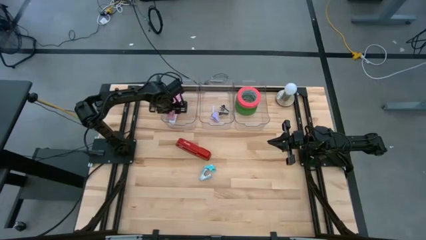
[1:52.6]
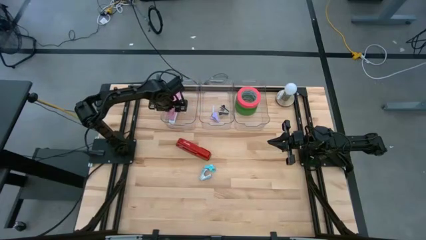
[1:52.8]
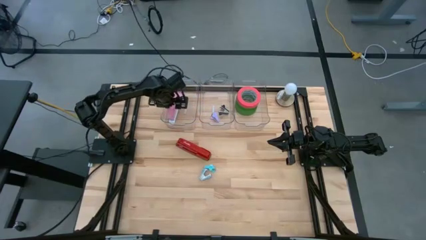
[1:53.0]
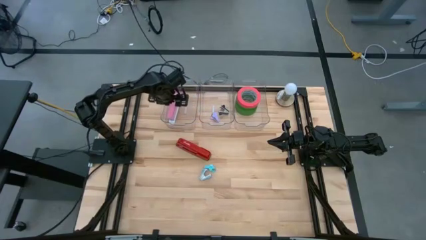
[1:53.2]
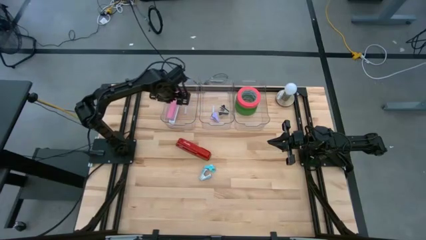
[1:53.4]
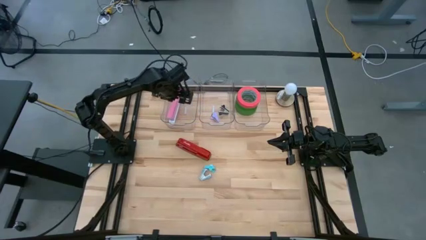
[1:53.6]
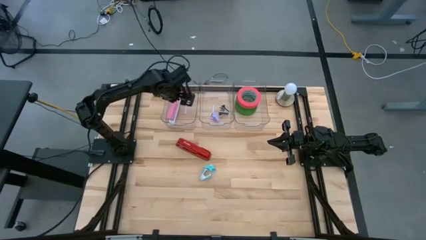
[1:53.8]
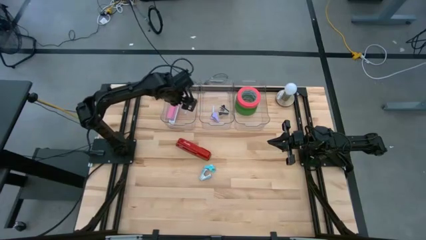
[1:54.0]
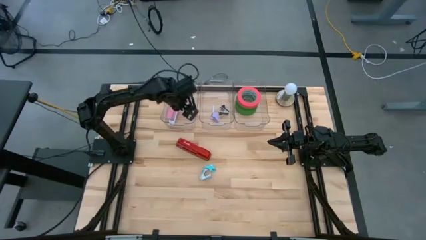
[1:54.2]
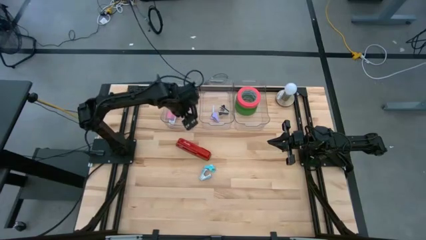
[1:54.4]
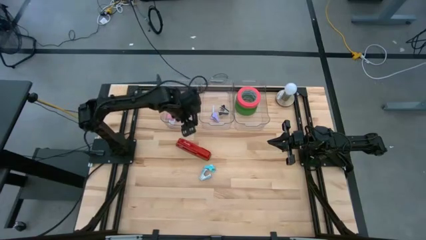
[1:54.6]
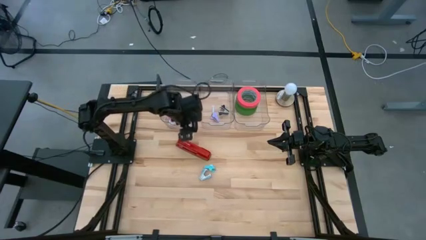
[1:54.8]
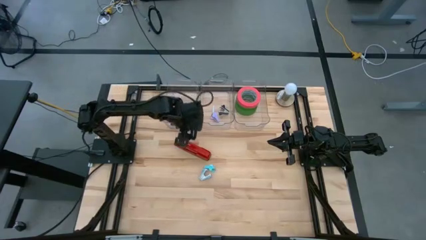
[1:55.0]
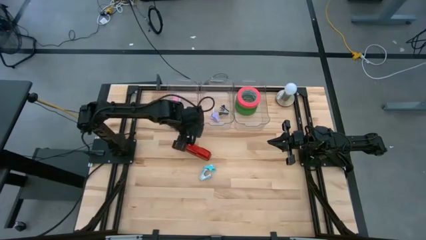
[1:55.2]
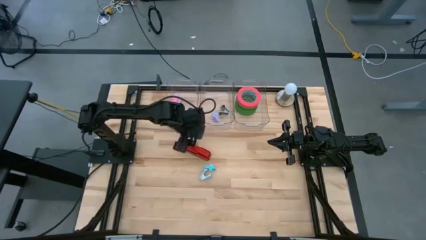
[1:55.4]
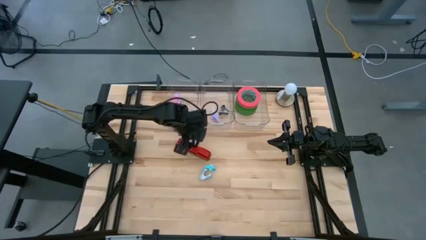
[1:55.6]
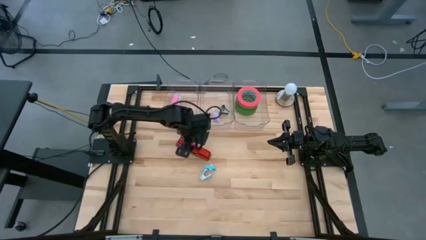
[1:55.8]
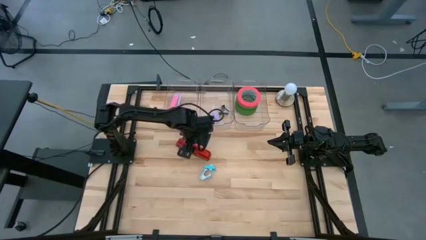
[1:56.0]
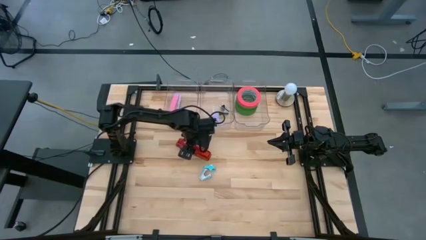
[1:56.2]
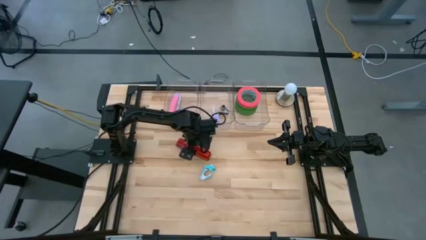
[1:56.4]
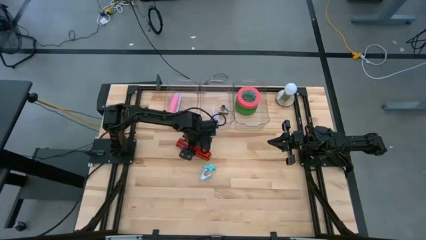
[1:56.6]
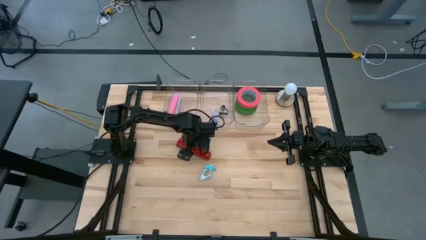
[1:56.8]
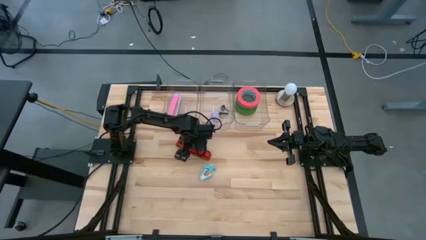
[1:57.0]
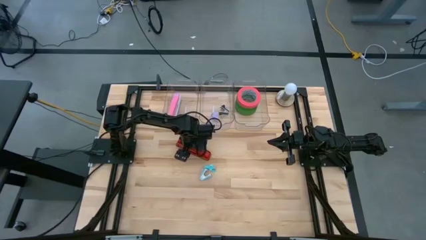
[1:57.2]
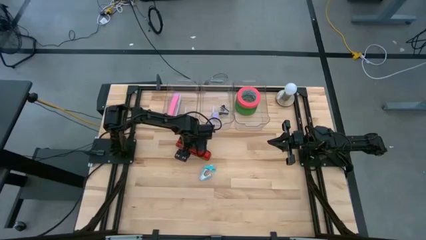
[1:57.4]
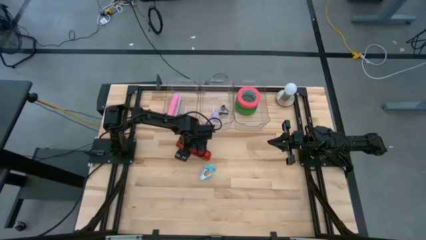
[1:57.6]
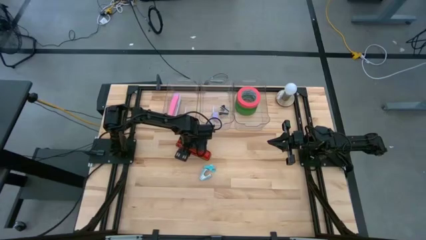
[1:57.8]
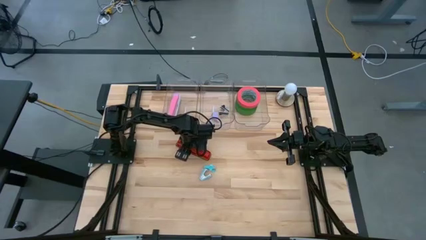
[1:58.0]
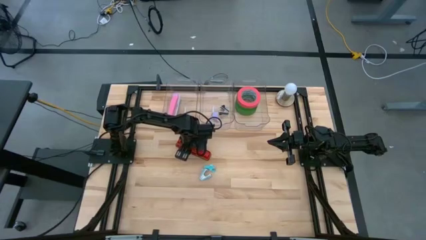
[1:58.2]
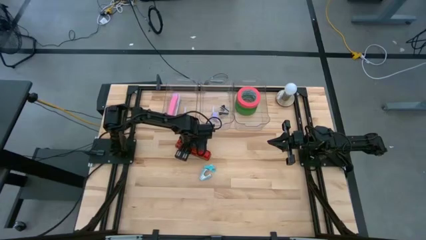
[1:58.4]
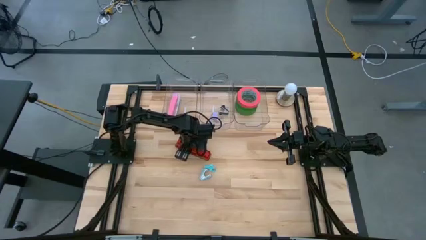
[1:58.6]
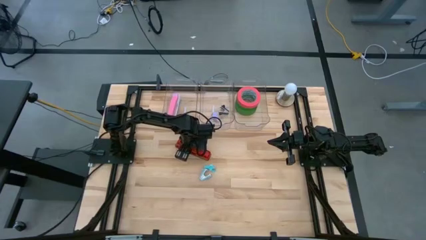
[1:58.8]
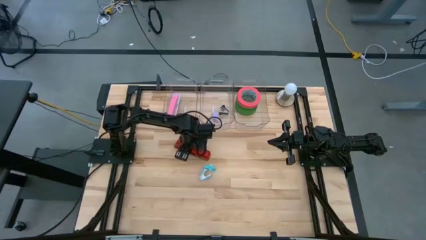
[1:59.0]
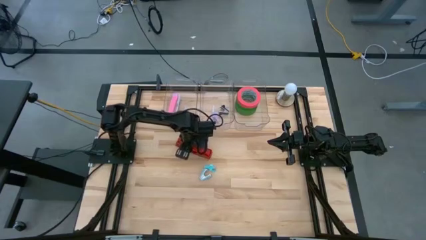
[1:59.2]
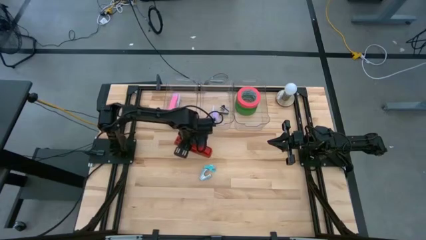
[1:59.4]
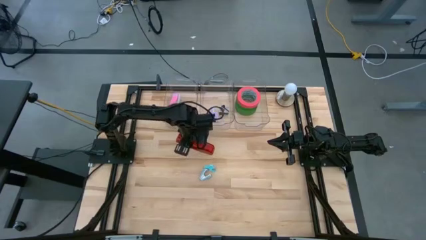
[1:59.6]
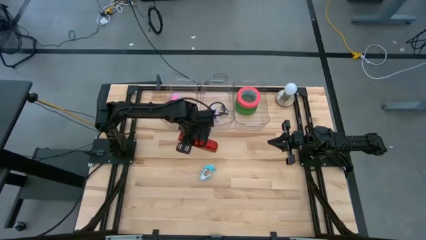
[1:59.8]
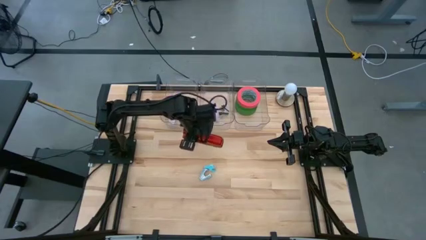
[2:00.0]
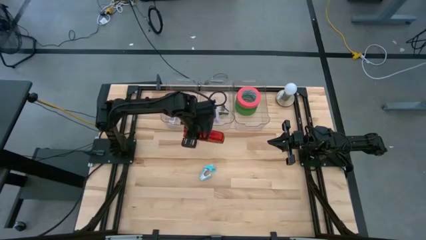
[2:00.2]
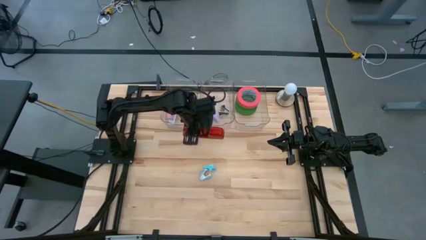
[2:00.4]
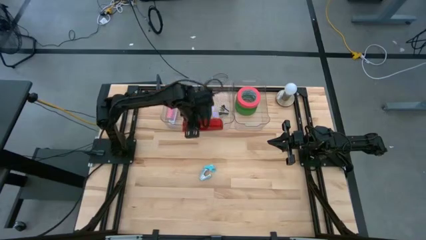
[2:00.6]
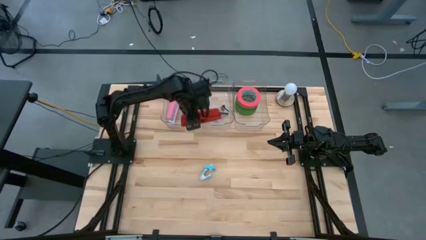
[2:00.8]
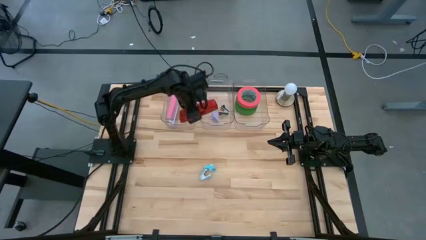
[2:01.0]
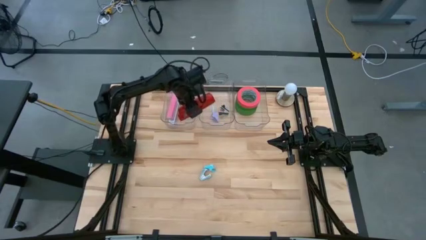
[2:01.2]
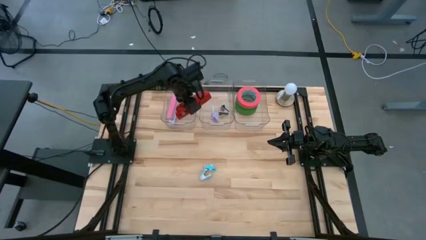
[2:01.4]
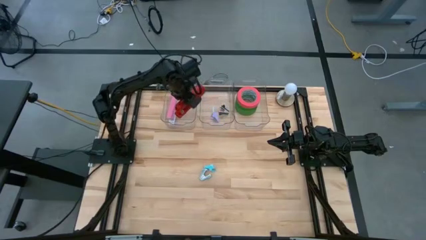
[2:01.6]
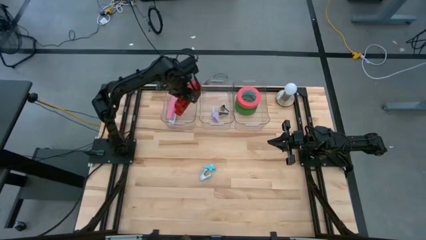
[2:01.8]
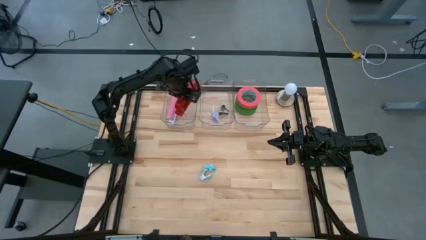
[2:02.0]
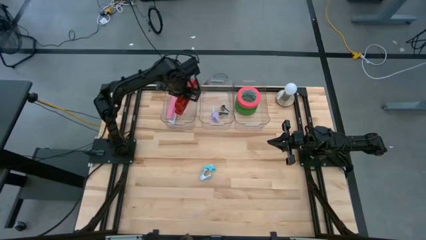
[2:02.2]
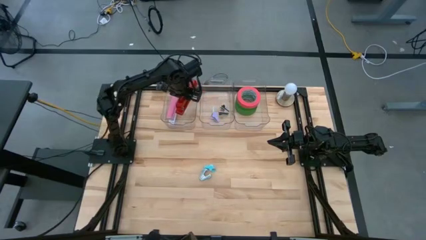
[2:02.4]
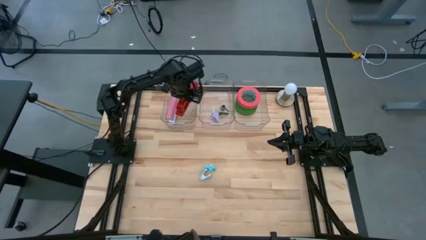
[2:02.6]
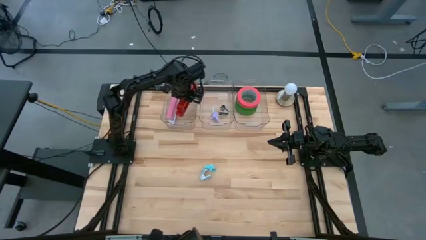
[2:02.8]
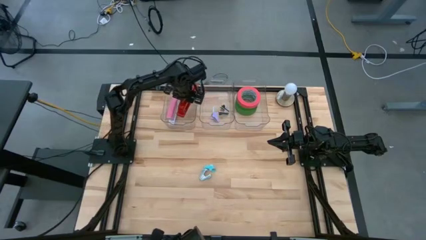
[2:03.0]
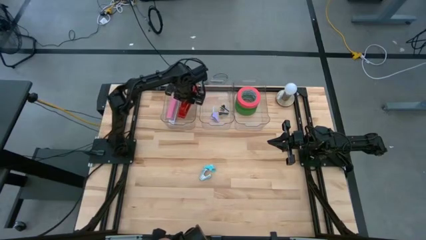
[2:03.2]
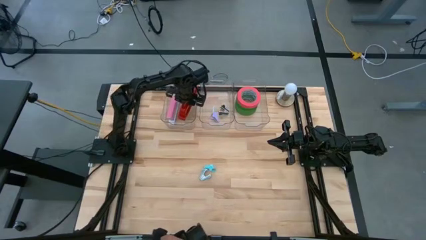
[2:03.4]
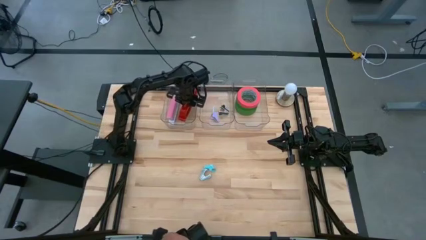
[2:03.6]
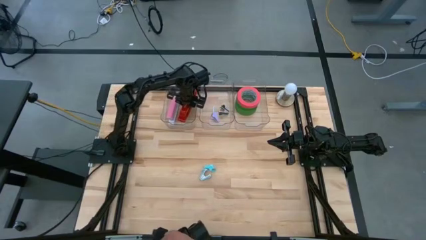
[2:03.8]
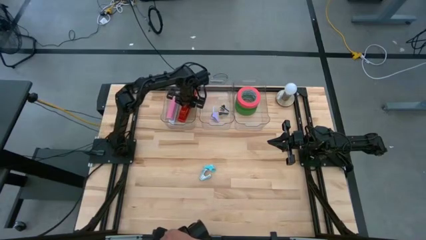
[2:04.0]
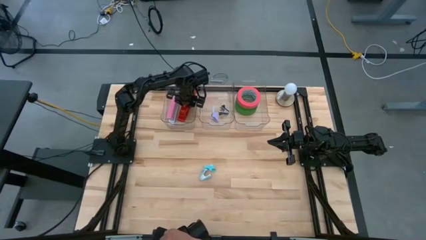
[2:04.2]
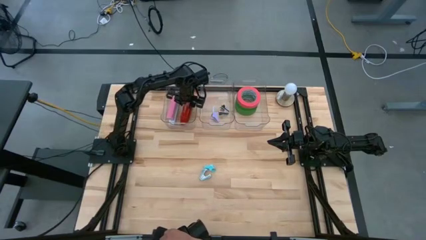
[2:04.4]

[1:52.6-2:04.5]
Task: Pick and place Stapler, Stapler remover, tape
Put the red stapler into the left transparent bin

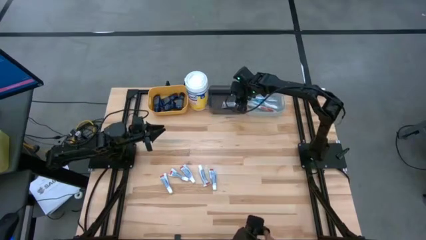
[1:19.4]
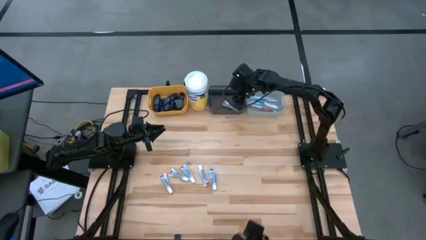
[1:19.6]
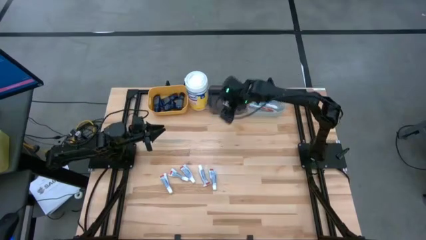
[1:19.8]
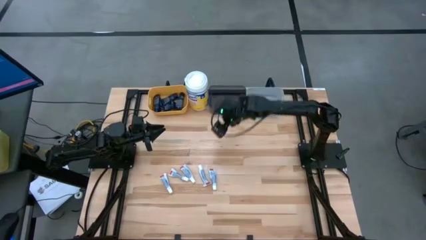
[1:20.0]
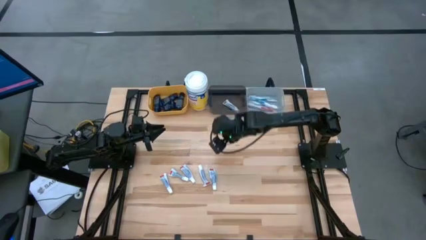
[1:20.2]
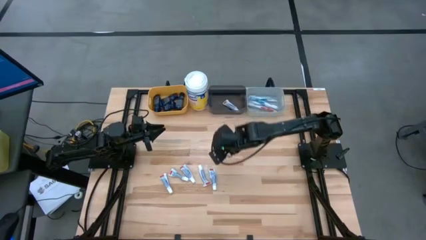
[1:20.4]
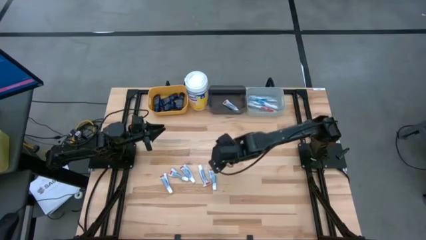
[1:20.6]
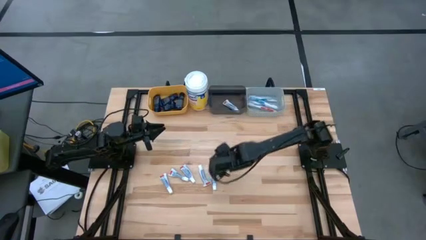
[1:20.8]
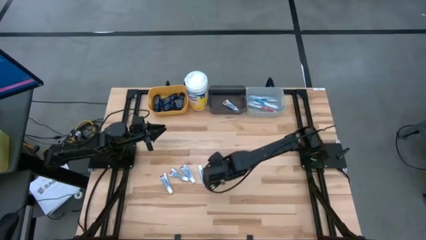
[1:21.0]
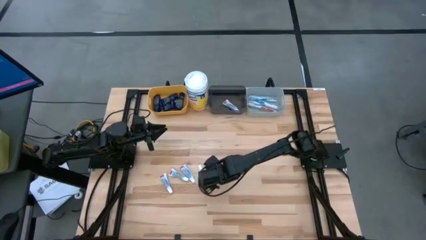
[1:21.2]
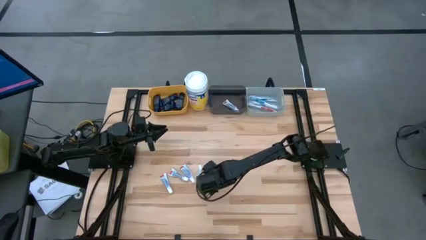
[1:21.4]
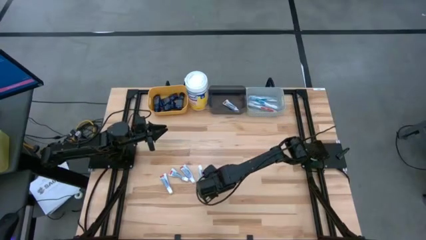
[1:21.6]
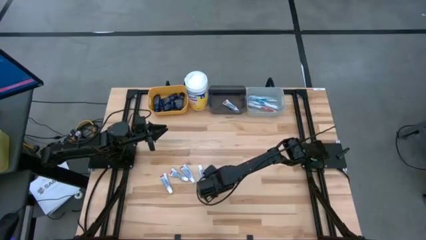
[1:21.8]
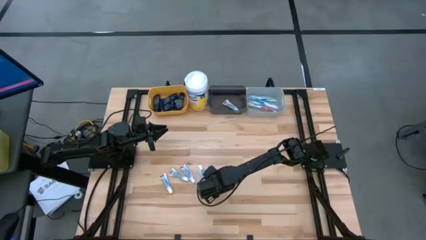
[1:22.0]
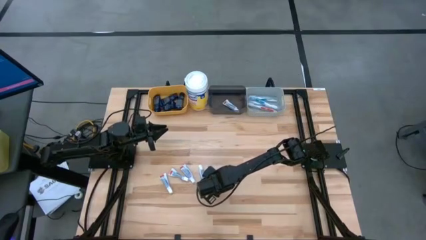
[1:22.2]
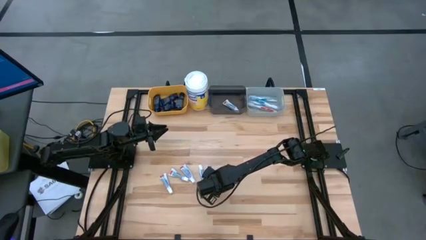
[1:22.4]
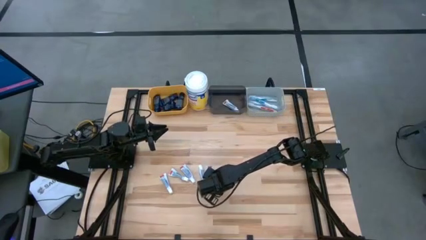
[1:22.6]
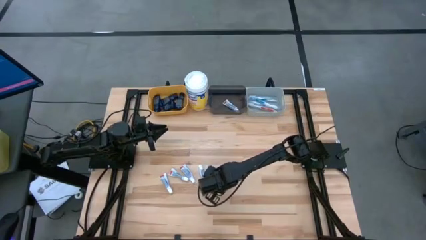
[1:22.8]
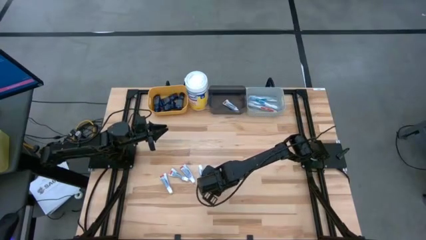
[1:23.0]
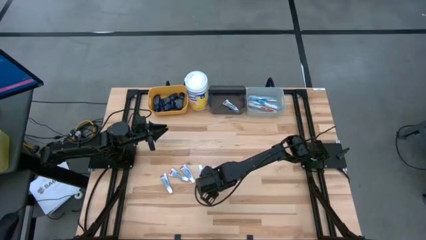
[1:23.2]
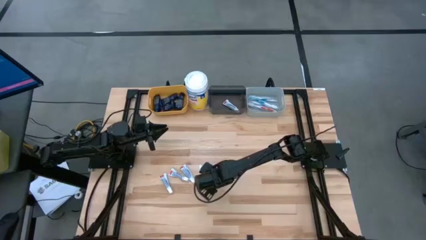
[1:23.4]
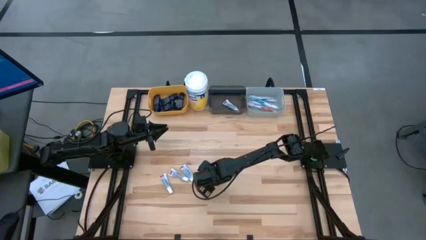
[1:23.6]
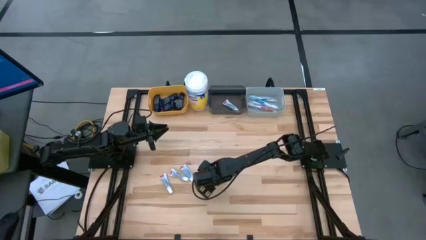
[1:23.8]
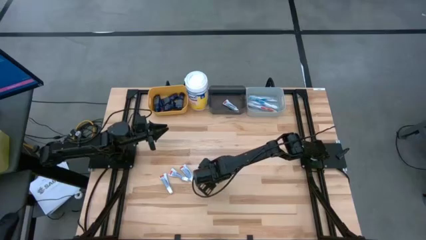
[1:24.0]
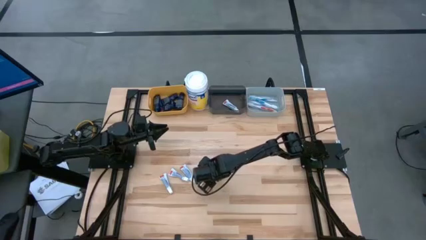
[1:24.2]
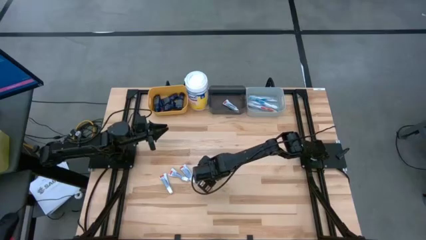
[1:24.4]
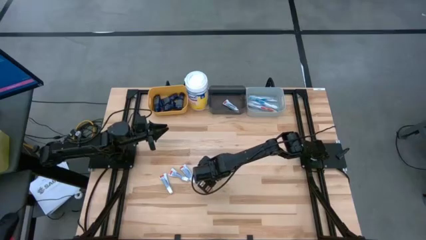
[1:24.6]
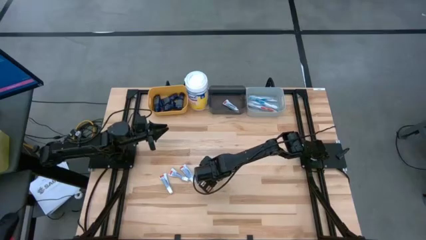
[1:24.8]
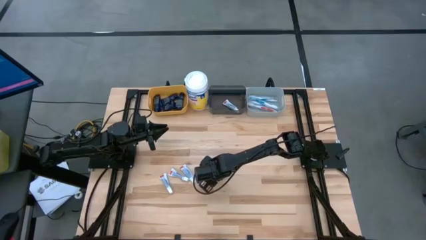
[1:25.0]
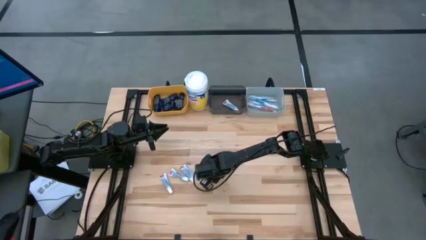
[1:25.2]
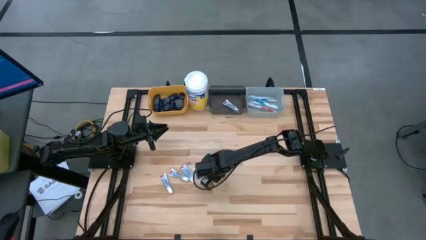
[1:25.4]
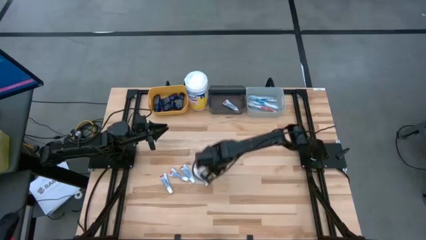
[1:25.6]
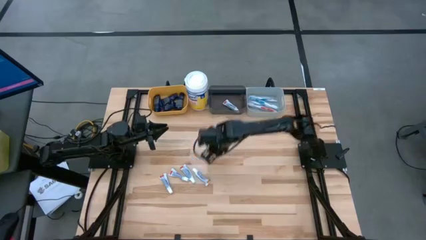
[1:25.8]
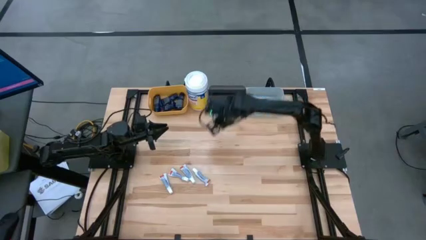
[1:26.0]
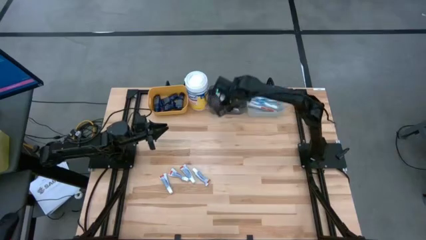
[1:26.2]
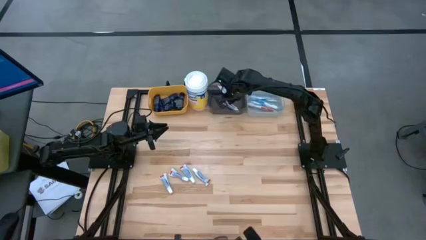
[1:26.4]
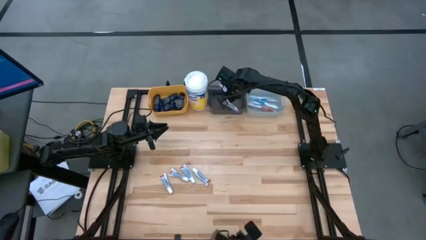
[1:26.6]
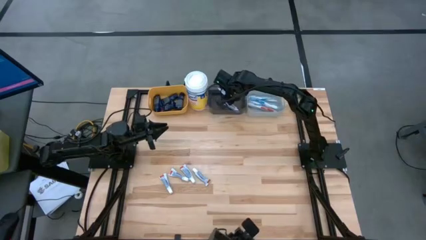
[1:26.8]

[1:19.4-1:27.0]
Task: Pick & Place Travel size toiletries
Put the white toothpaste into the black bin
